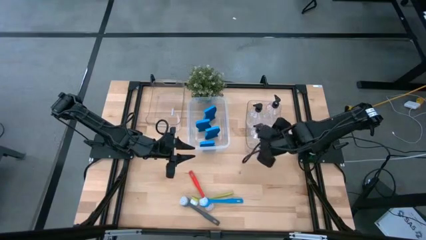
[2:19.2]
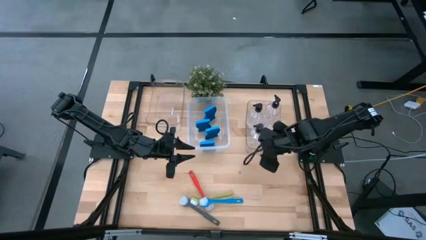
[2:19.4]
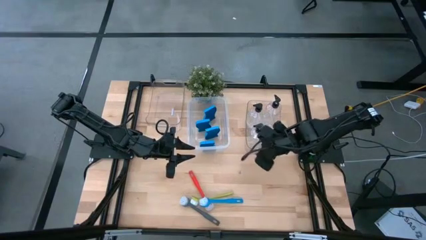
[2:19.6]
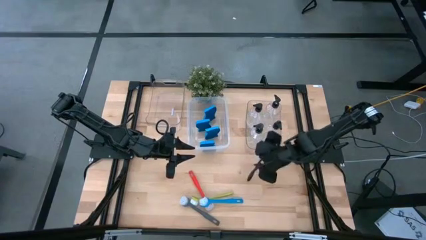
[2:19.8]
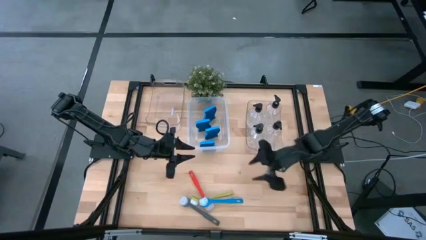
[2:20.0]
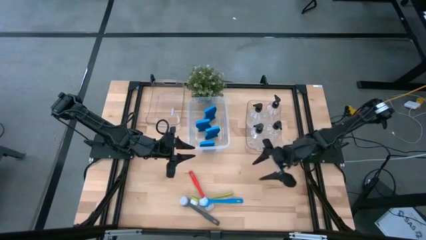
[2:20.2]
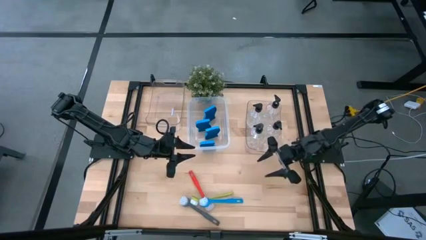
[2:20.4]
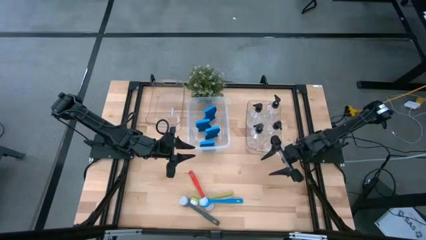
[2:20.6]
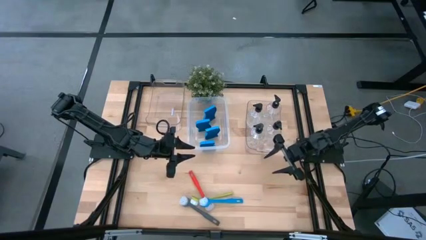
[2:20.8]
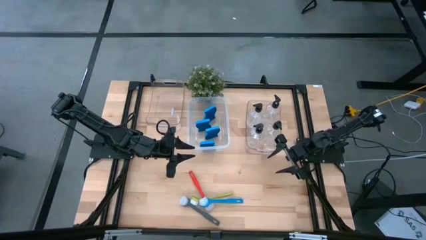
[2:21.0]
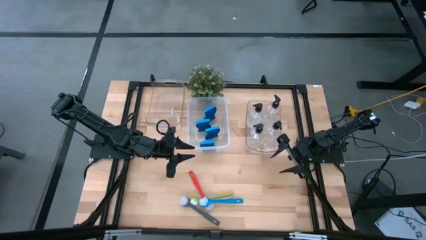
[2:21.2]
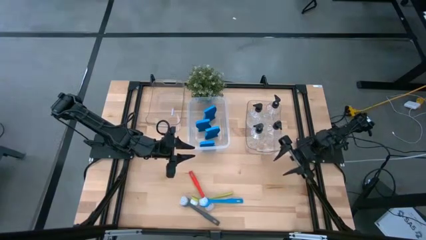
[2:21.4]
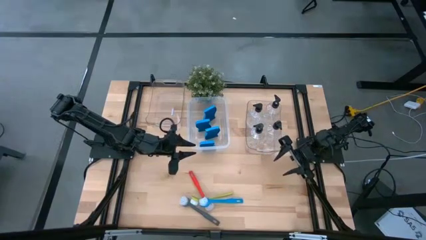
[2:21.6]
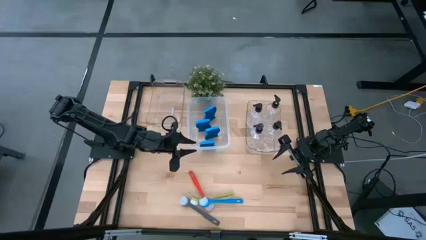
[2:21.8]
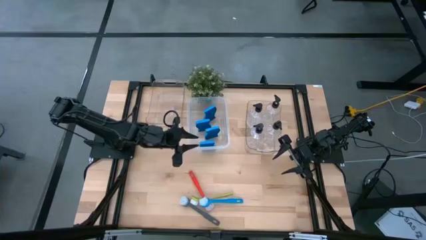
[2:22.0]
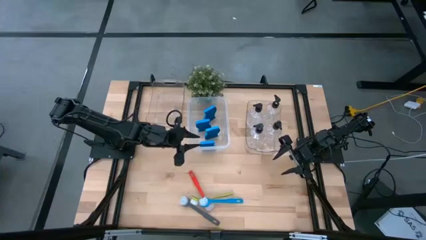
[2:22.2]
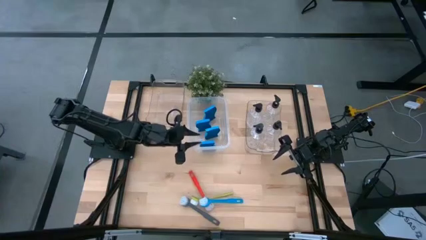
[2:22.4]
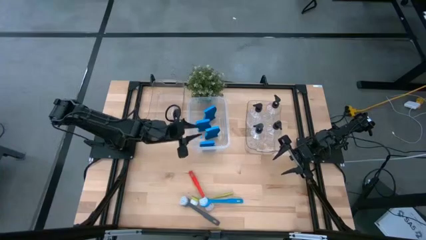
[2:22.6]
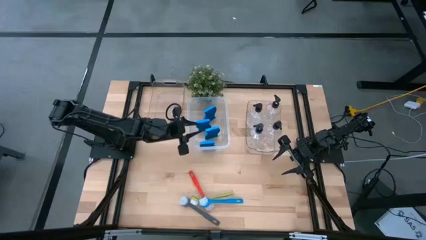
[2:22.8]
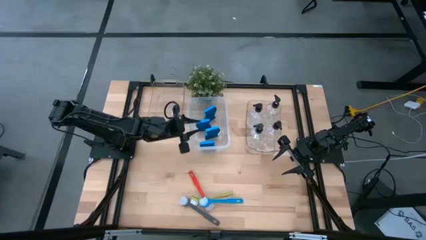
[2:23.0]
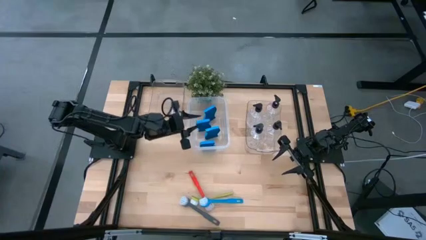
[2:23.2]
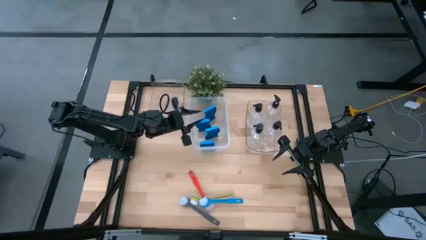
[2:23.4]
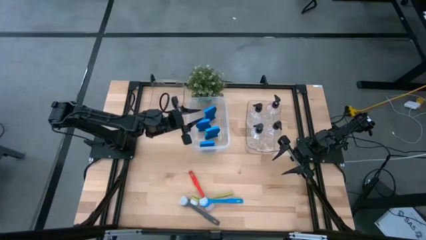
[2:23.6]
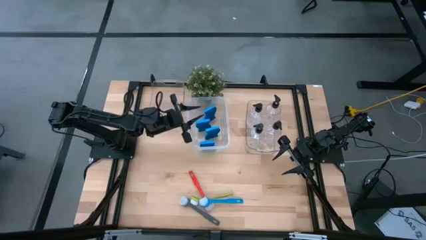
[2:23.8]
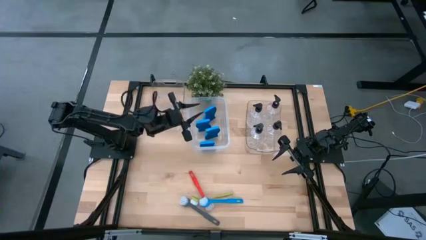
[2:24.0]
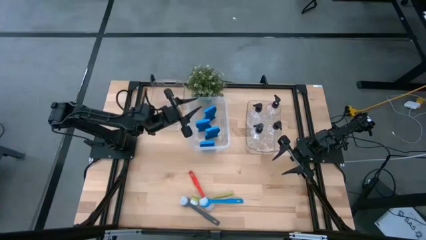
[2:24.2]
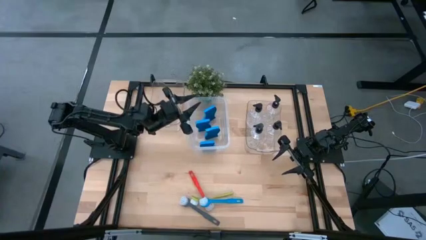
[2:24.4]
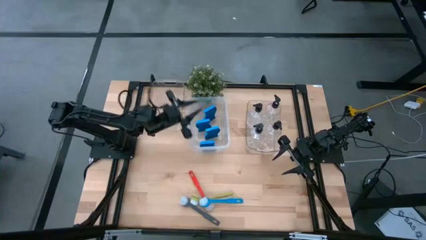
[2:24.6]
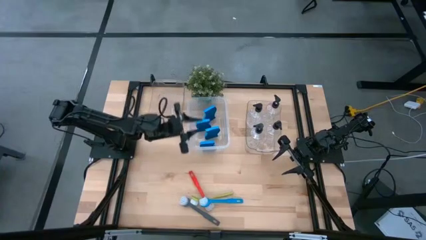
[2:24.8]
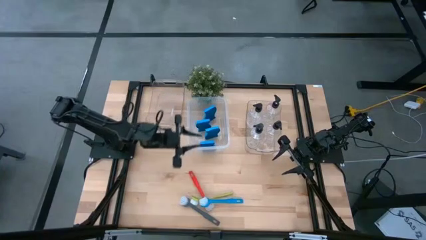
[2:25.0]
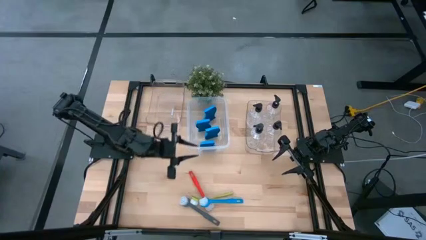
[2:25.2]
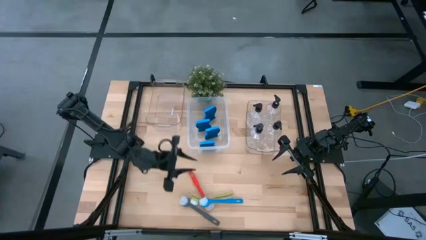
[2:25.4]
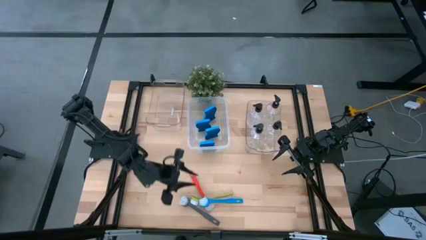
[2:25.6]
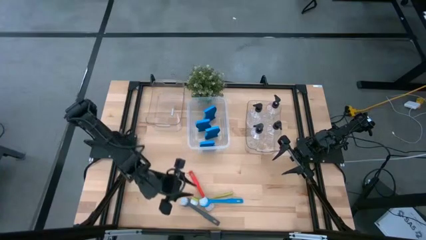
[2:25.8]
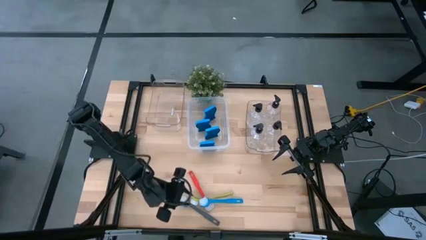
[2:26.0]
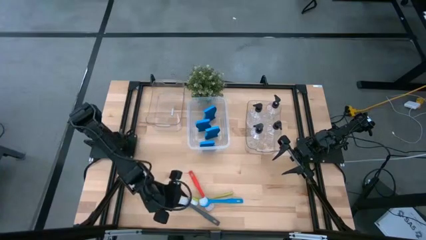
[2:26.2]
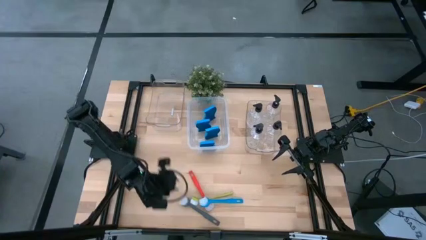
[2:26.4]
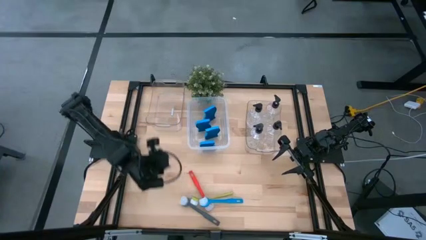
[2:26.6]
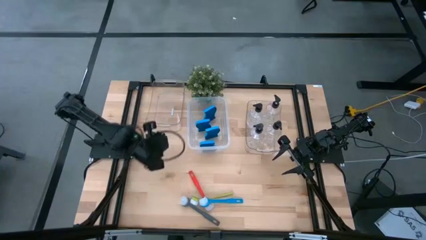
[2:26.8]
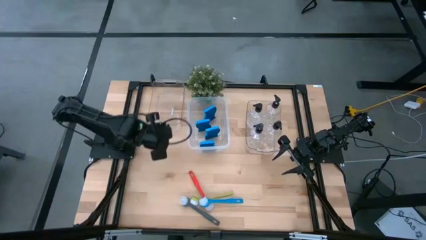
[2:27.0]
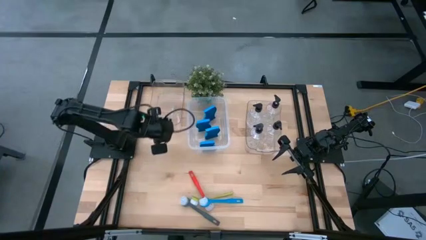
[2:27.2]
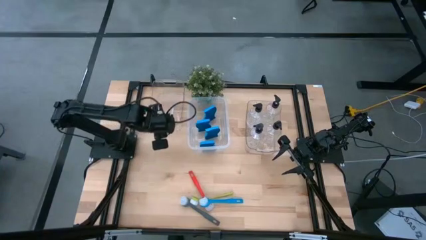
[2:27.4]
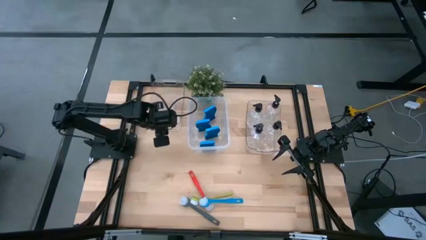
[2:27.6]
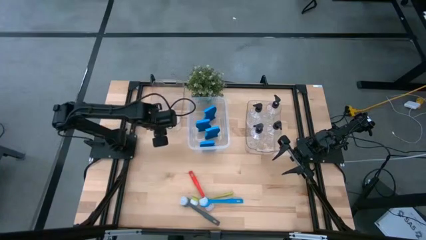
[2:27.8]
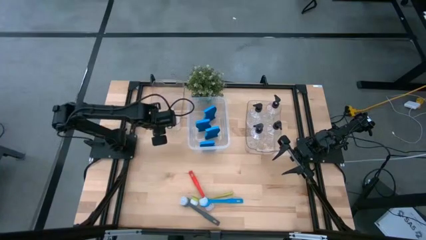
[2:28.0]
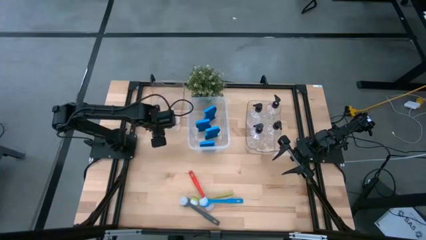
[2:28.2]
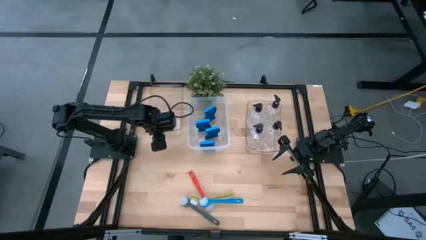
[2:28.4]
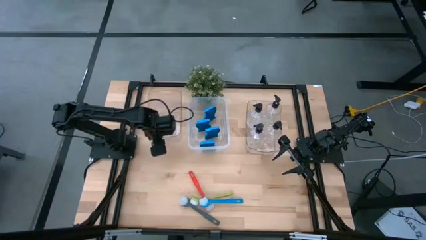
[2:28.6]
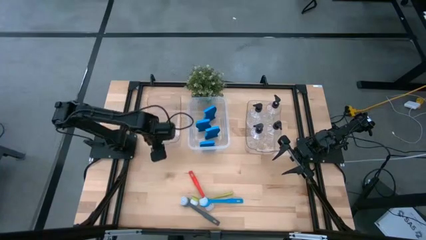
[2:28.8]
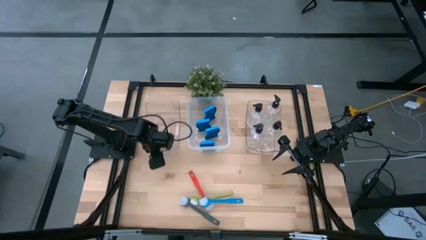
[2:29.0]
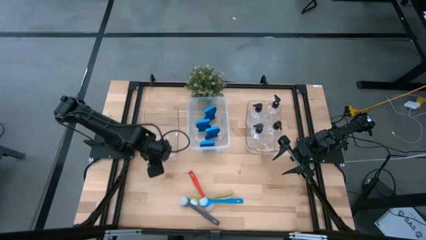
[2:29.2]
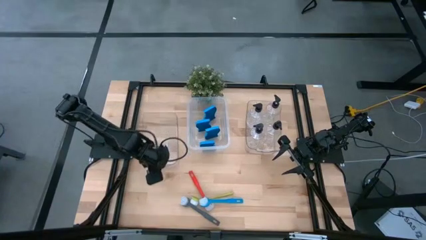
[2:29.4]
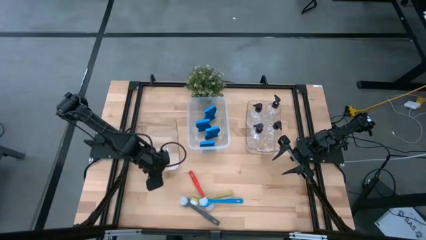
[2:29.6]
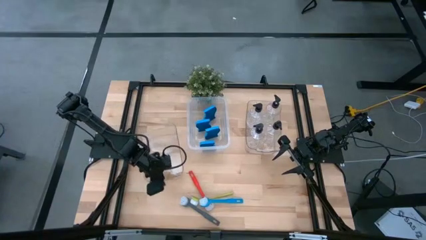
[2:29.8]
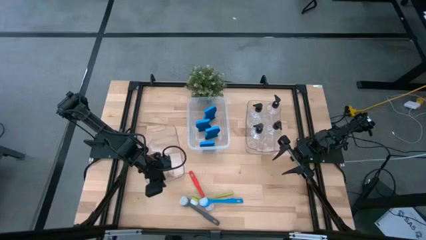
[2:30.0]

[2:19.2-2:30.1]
Task: Pick & Place Kitchen Sink Supplies
Adjust the left transparent bin

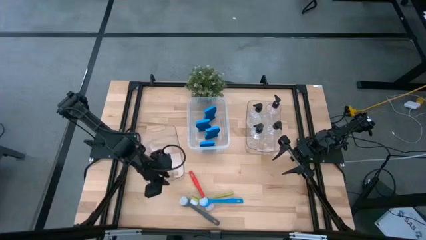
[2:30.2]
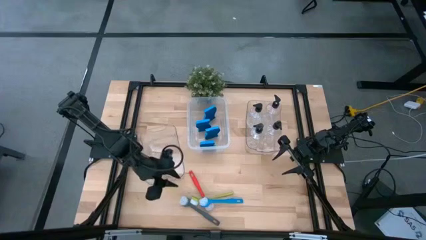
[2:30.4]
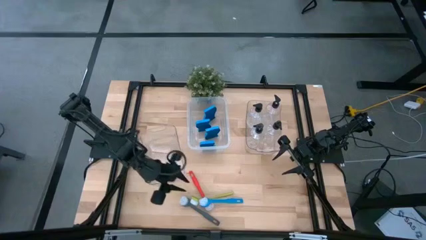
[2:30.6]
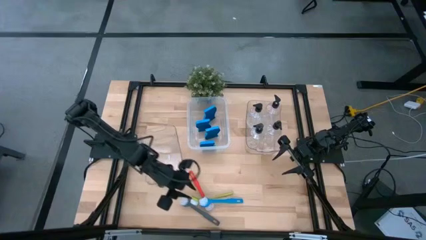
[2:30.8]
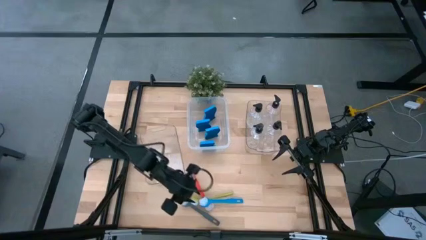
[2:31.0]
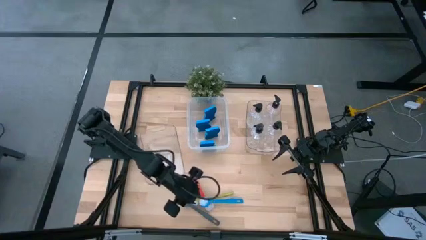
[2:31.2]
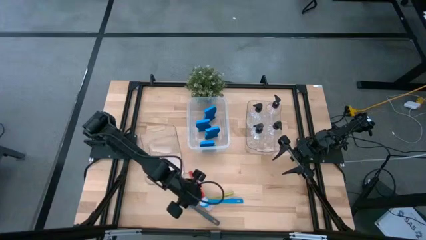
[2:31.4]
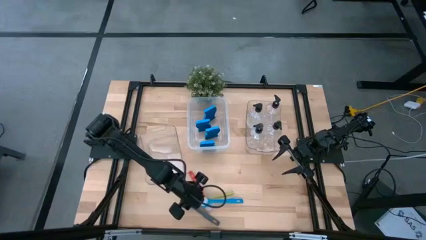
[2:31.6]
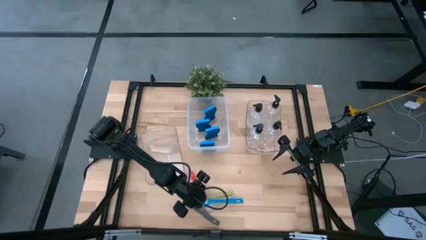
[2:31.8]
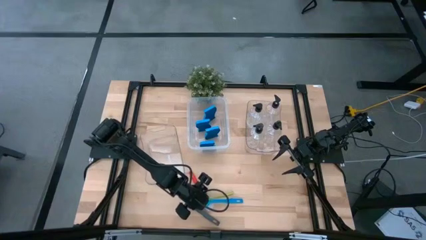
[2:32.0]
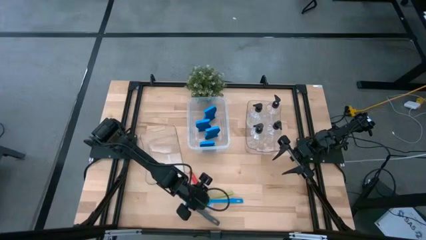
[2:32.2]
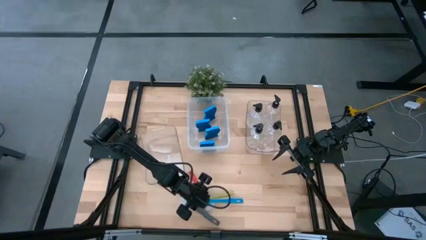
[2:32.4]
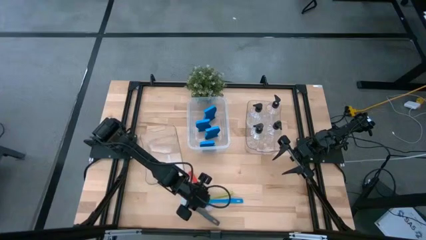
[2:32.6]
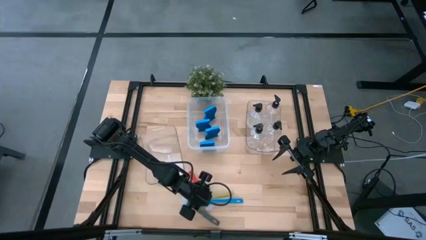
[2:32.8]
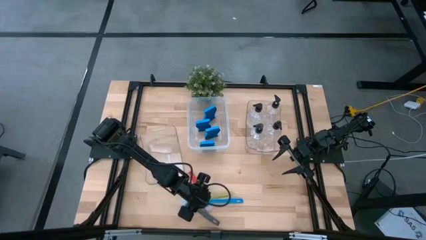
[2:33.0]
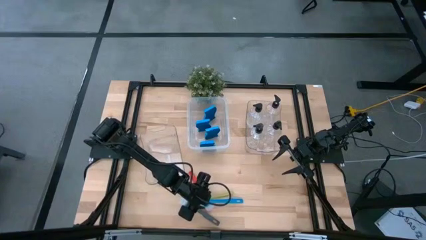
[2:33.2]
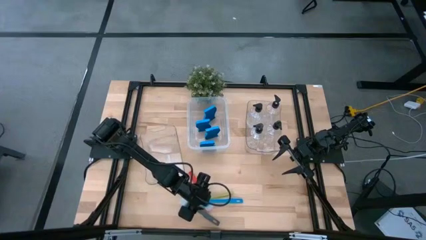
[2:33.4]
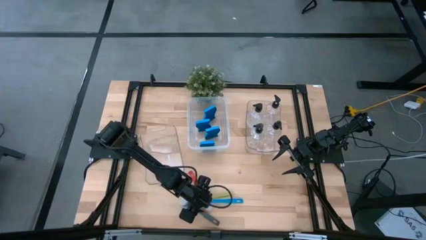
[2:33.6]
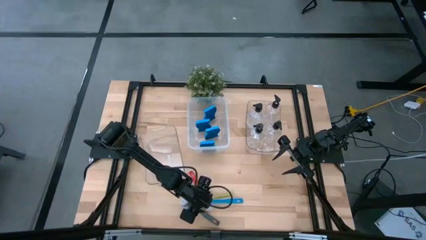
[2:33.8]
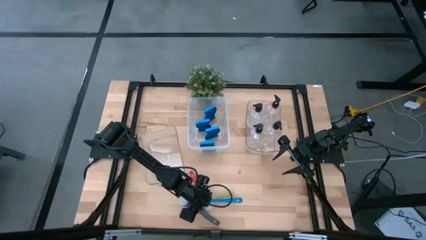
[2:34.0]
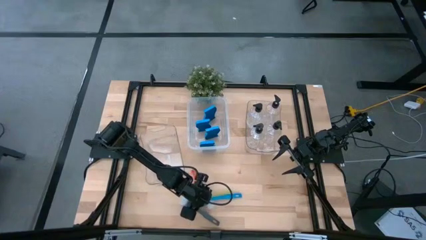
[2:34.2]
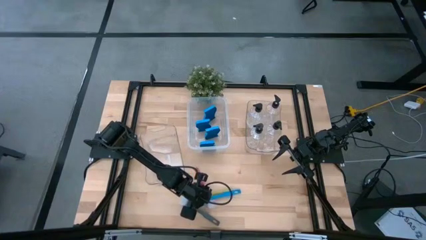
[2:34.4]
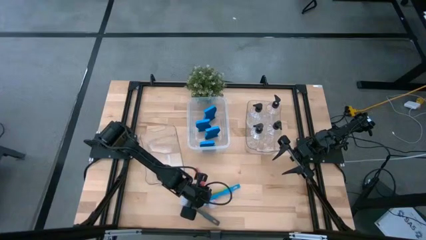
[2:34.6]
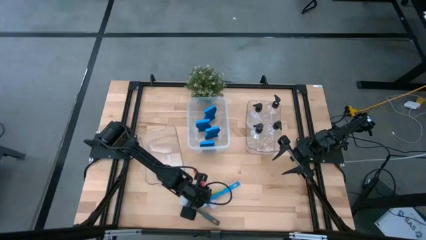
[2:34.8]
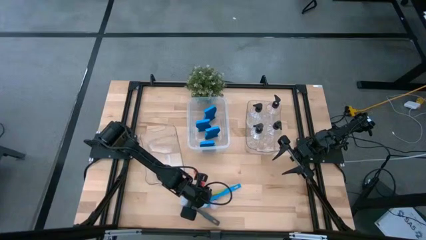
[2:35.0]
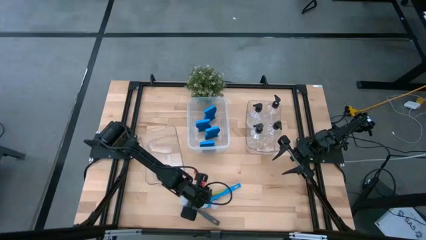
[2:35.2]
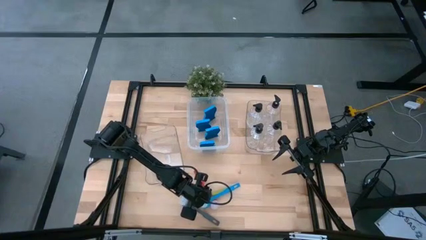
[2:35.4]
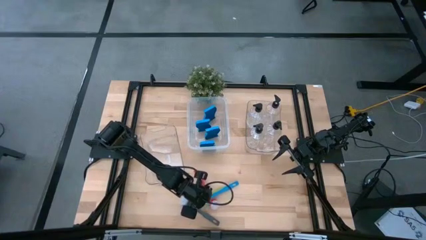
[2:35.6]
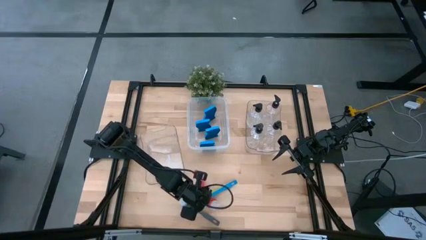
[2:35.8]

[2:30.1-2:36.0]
Put the blue brush into the left transparent bin
